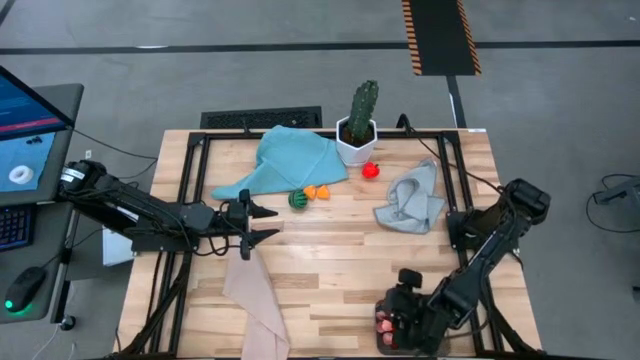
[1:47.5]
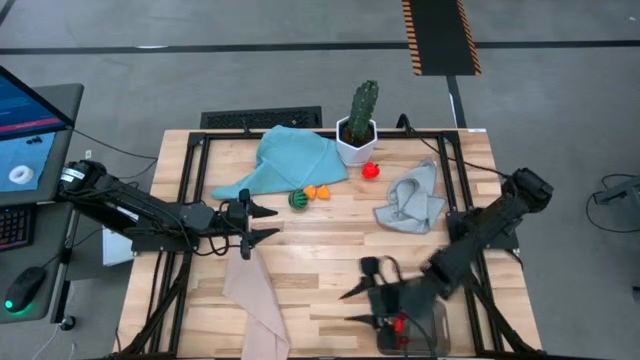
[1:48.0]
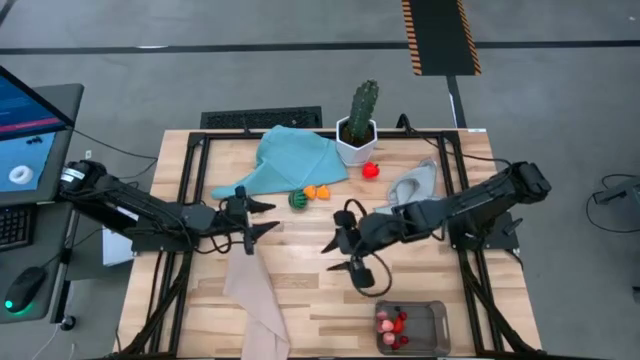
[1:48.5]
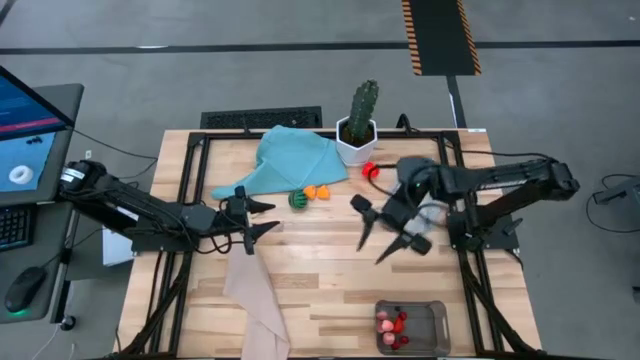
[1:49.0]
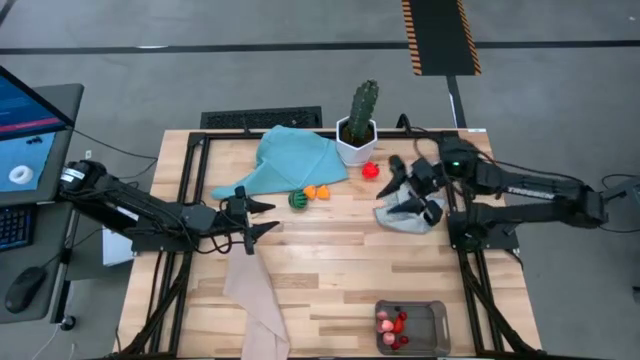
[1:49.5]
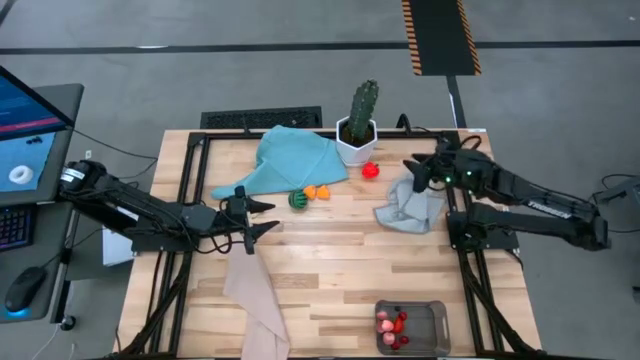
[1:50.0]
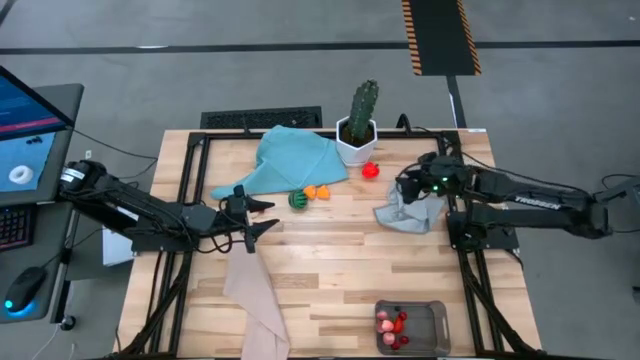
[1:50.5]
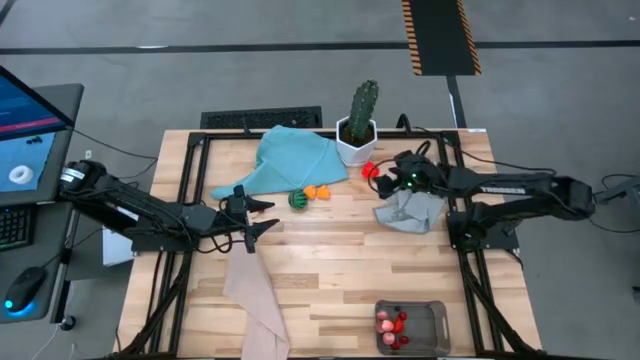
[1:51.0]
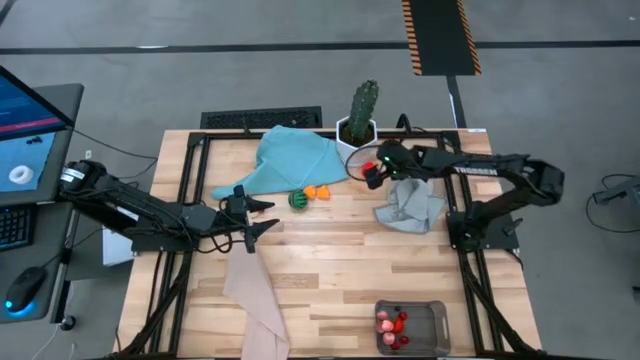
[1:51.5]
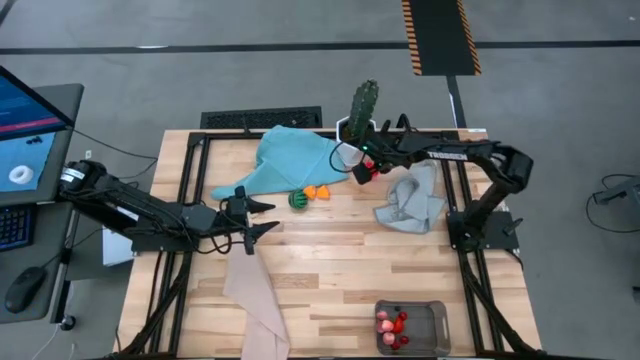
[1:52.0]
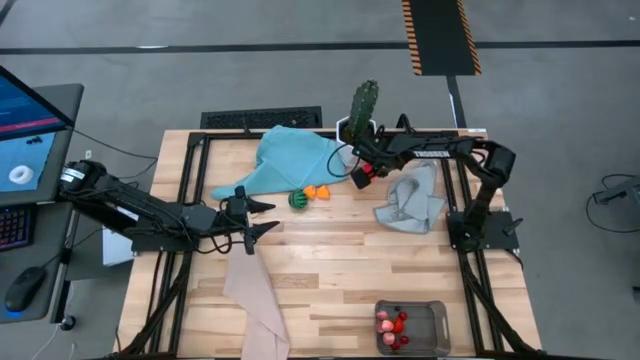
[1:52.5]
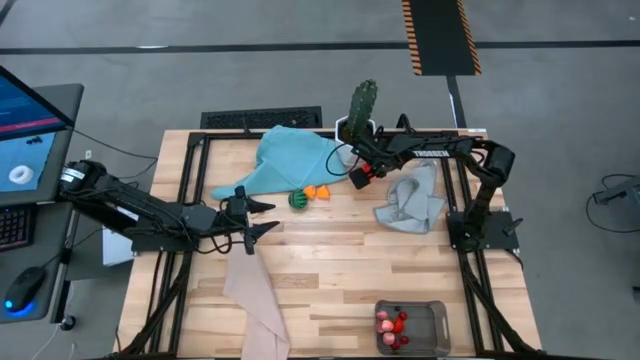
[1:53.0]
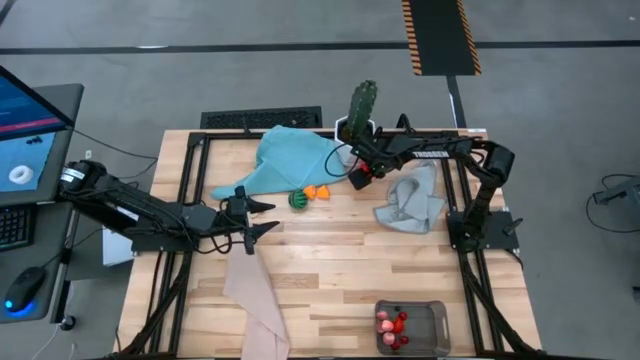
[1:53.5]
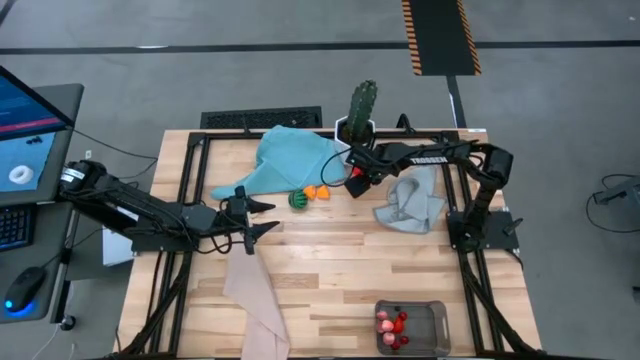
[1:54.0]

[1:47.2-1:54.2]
Task: Pick and placing Produce into tupperware
Put the apple into the black bin

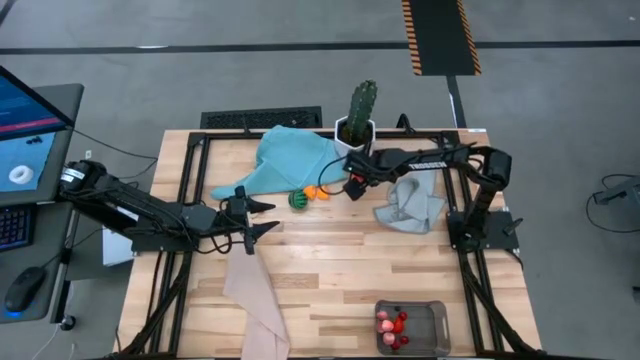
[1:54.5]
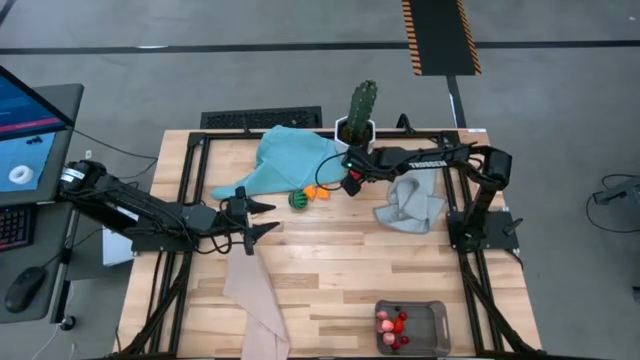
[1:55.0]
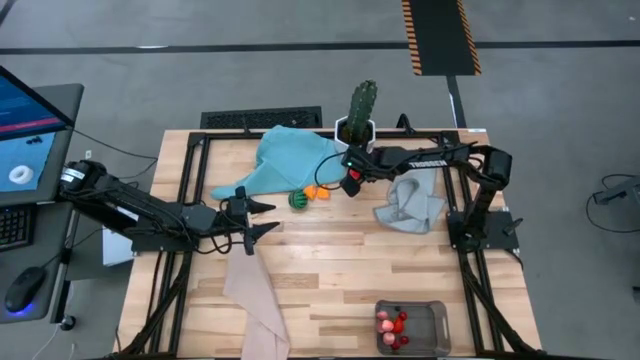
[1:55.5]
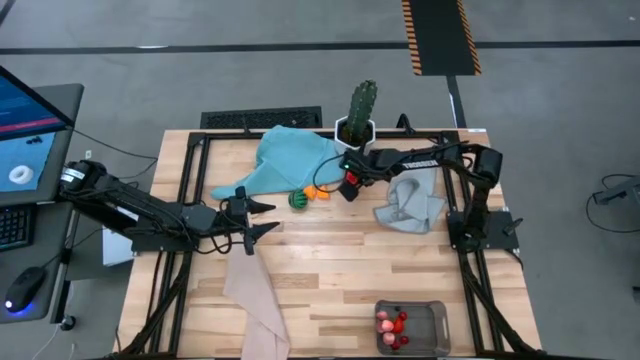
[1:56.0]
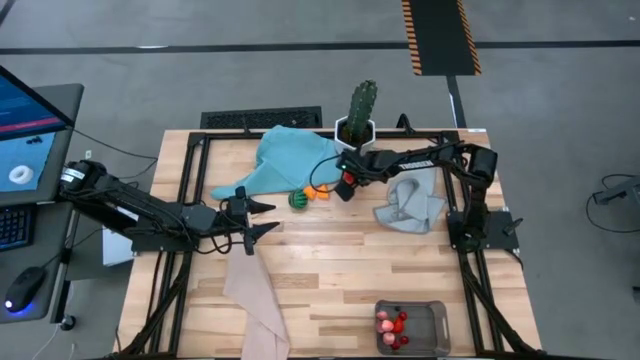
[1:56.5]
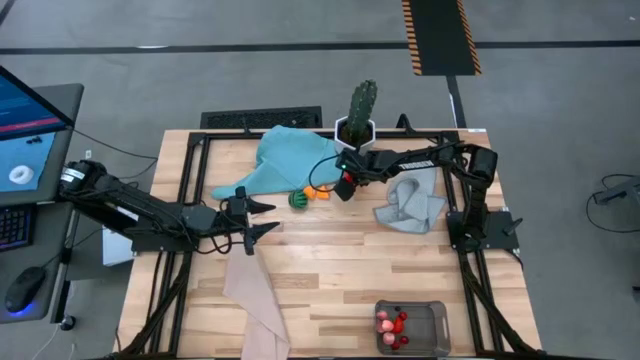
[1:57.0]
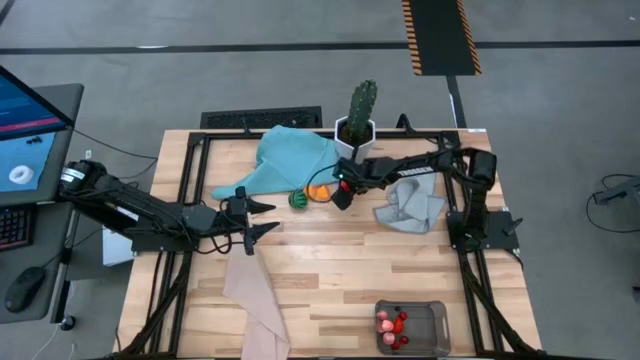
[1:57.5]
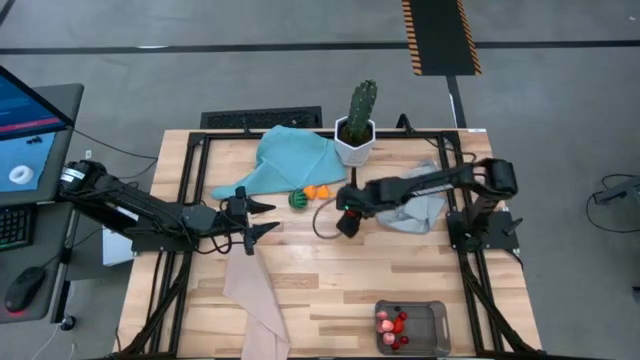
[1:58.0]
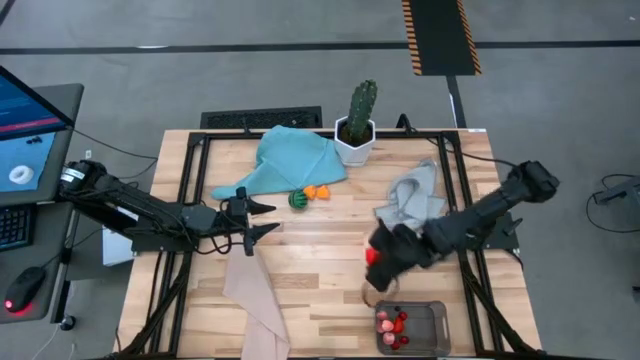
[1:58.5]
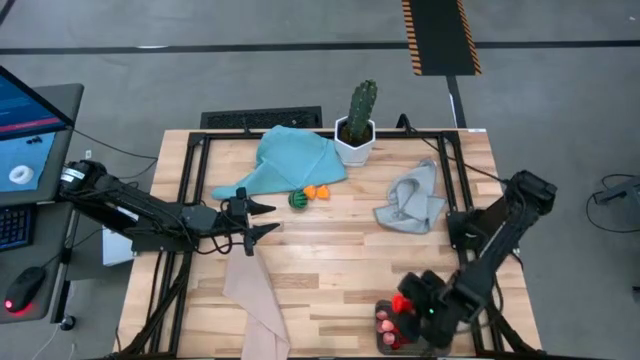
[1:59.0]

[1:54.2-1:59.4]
Put the apple into the black bin

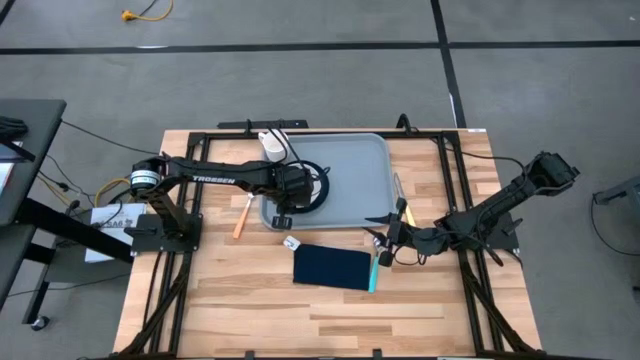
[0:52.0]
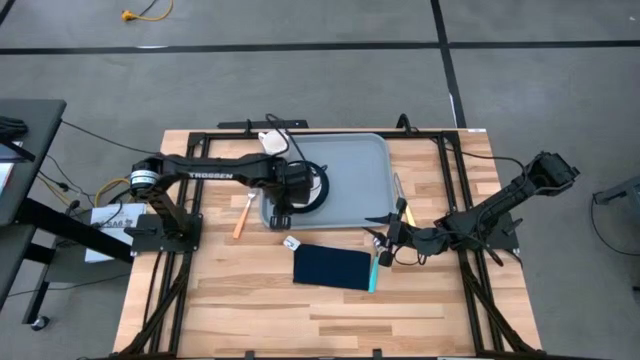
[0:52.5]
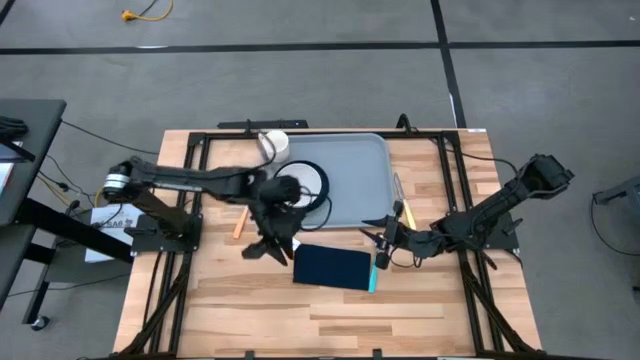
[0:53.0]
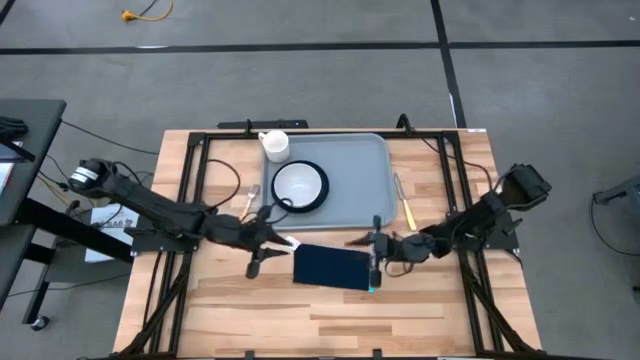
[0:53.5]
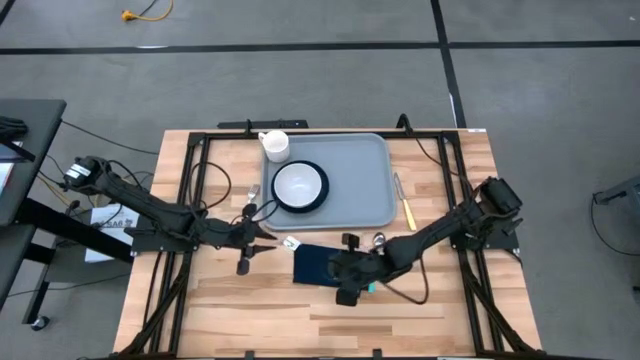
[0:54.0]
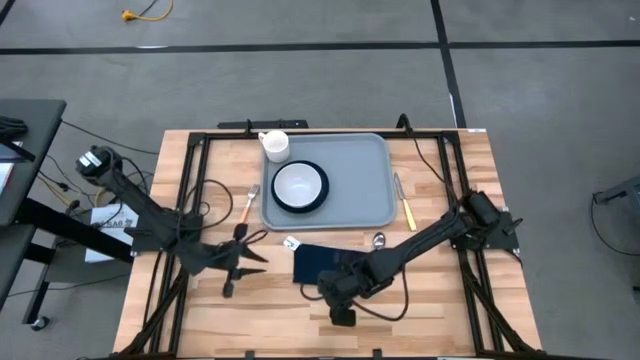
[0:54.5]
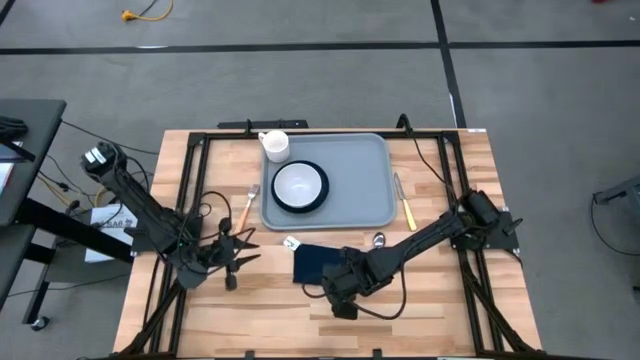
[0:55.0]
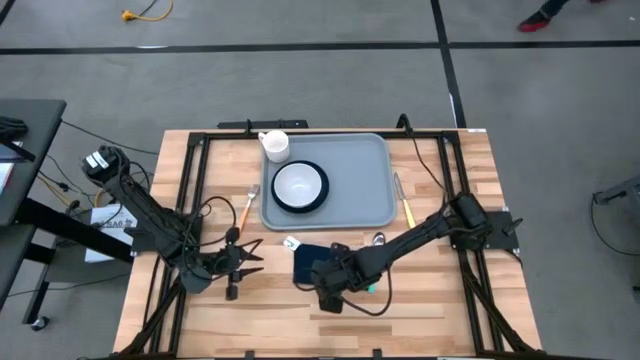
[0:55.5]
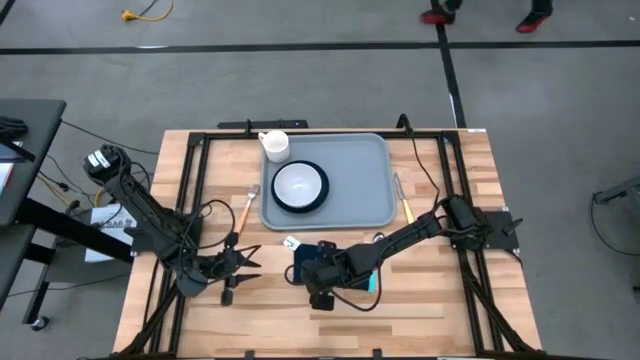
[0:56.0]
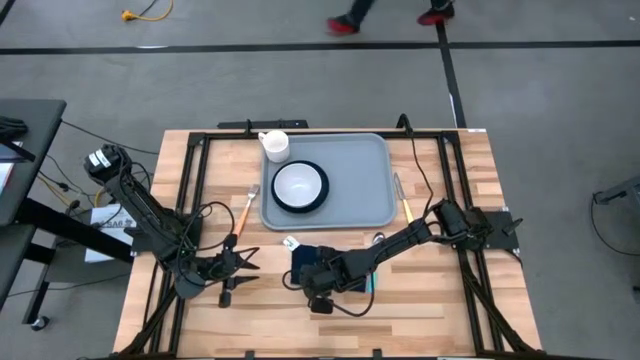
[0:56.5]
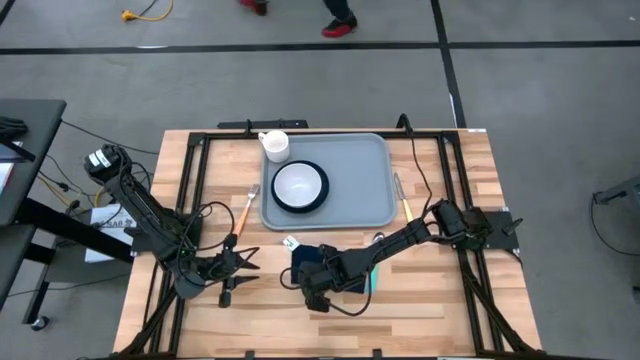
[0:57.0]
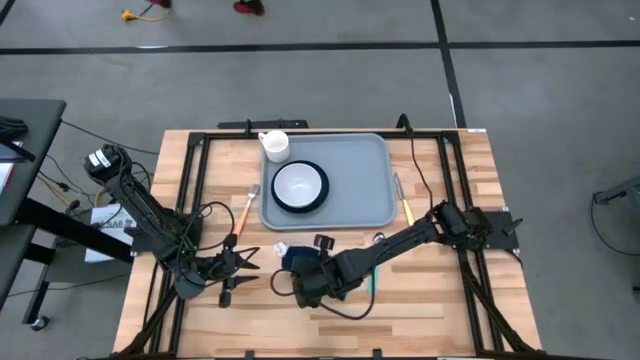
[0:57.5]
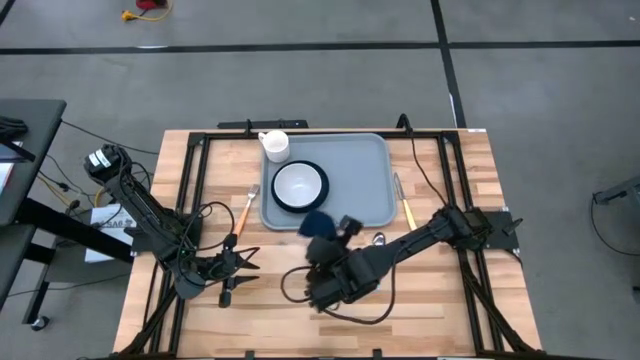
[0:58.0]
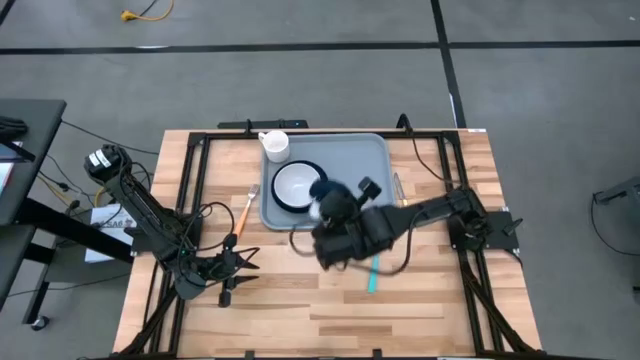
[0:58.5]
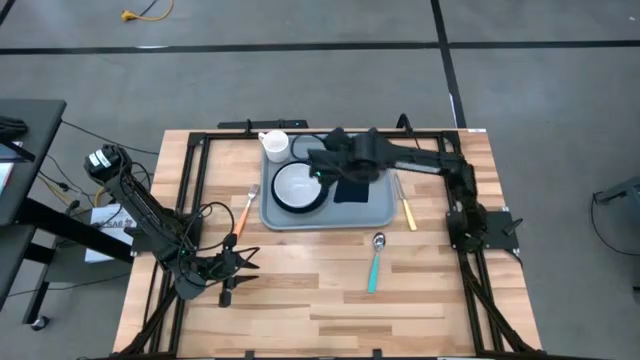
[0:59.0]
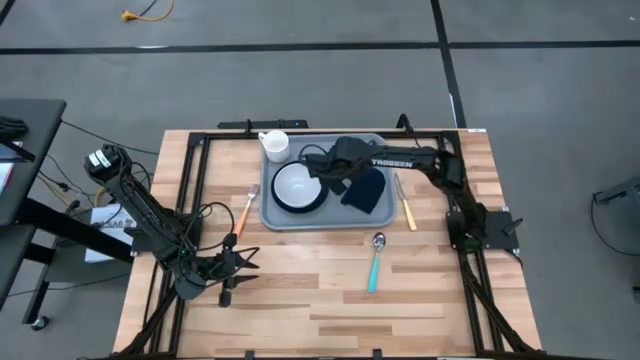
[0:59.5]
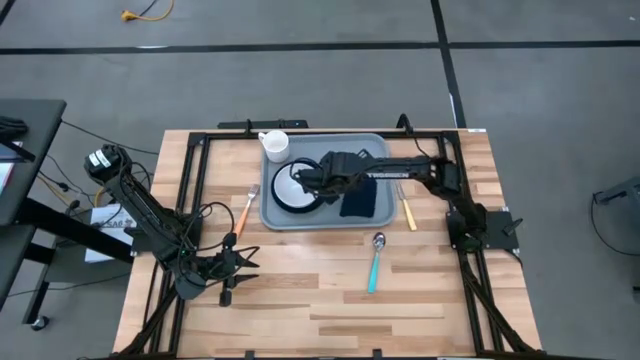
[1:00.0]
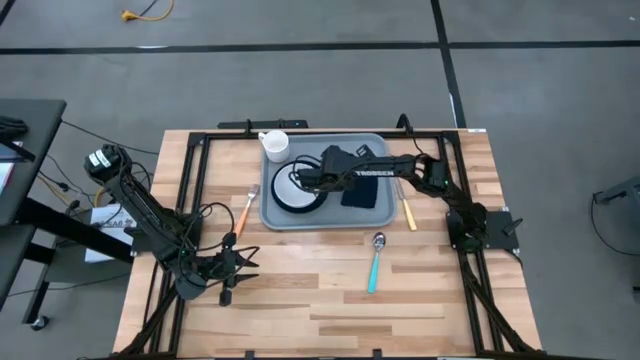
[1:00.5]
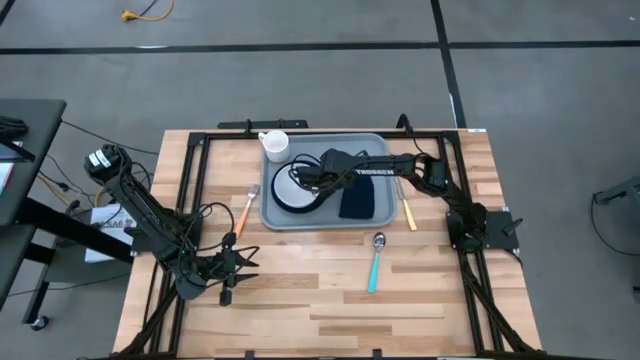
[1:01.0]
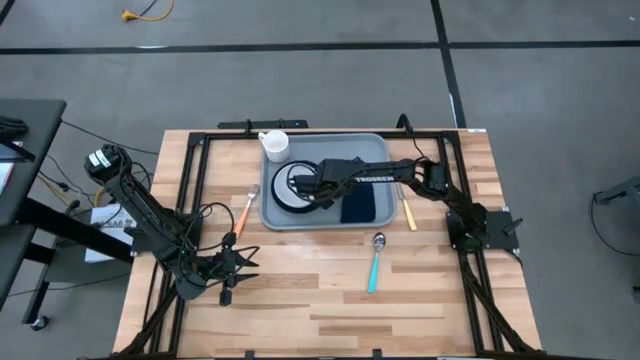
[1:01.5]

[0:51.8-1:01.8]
Task: Set up tray
Put the blue napkin to the right of the green plate on the gray tray
